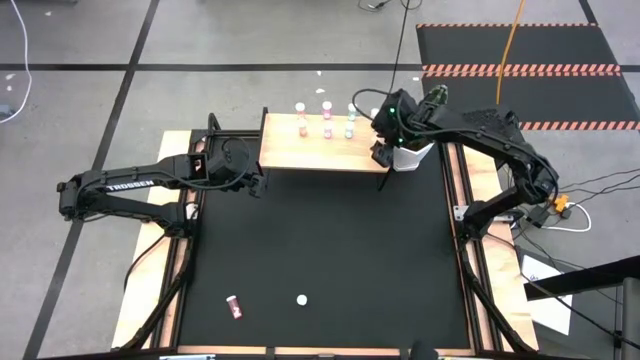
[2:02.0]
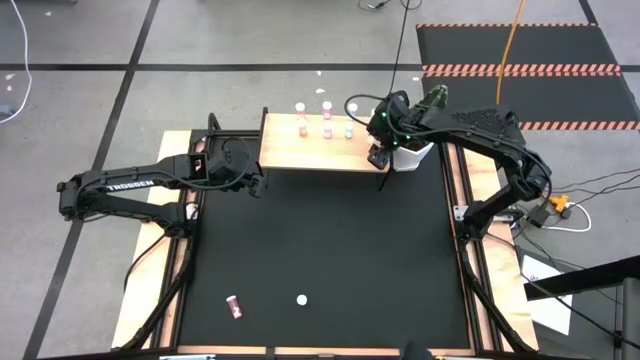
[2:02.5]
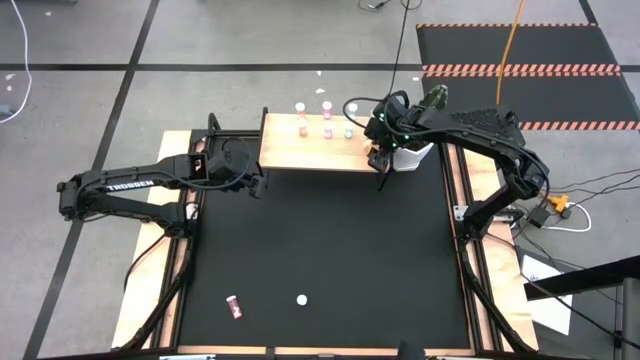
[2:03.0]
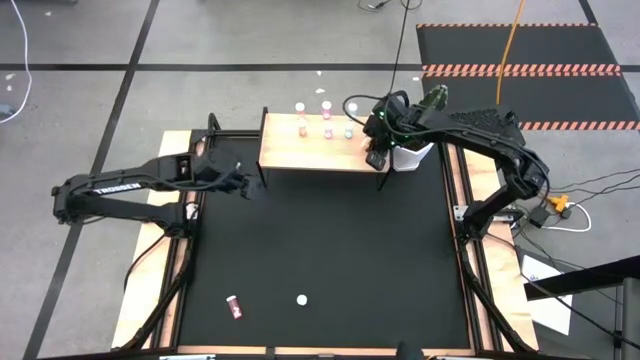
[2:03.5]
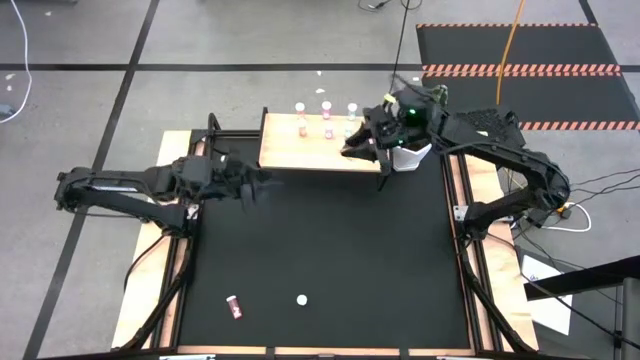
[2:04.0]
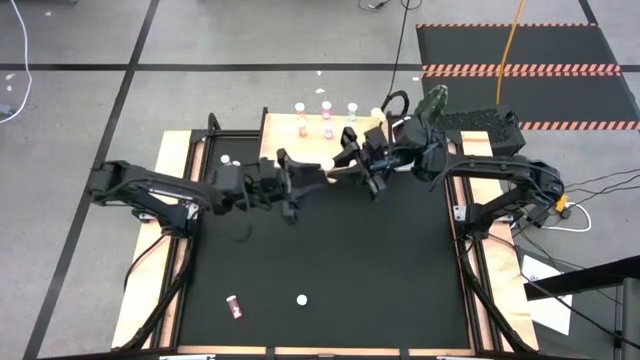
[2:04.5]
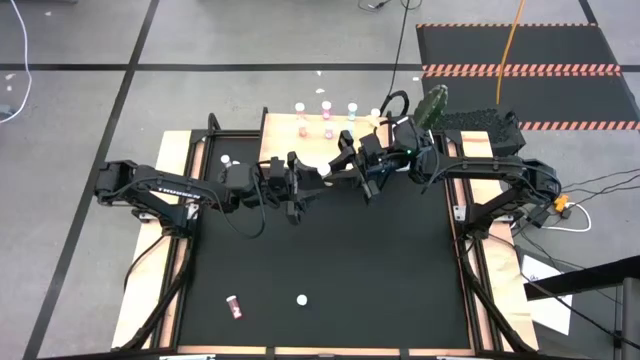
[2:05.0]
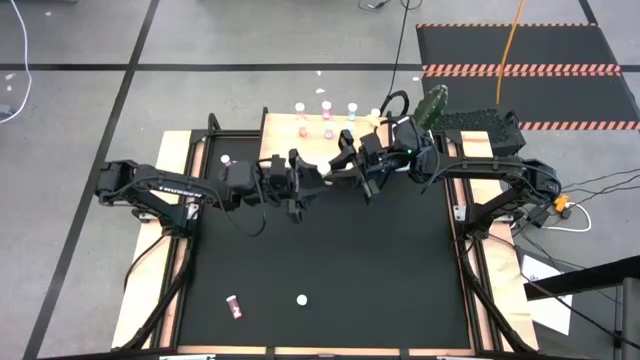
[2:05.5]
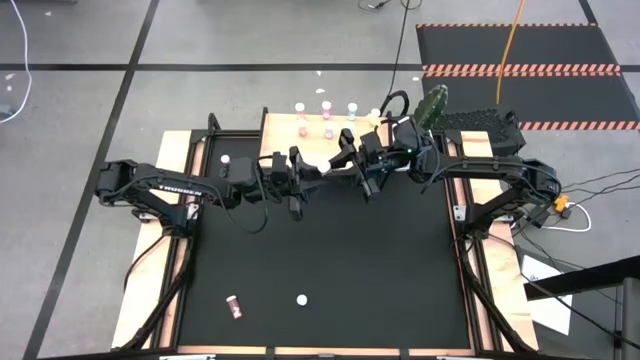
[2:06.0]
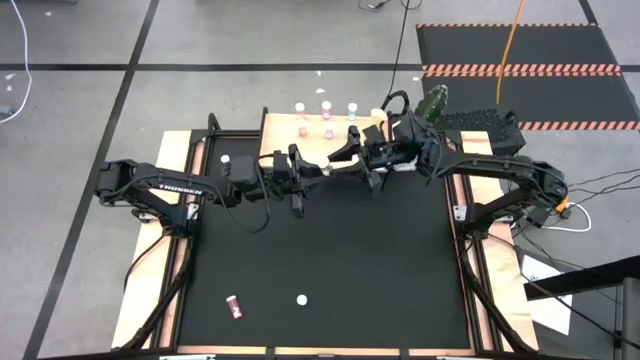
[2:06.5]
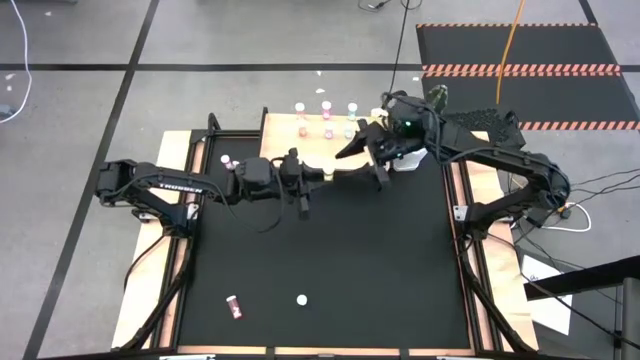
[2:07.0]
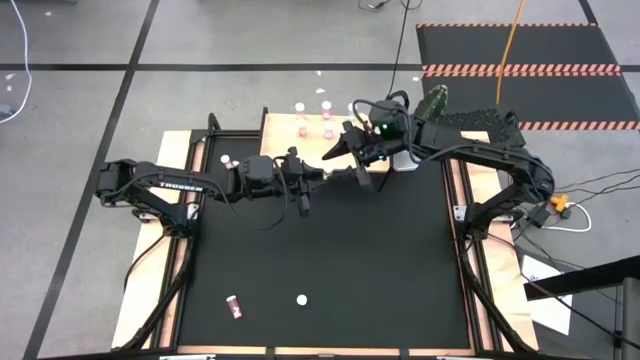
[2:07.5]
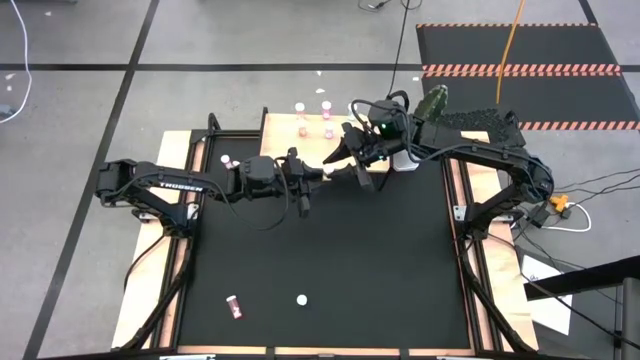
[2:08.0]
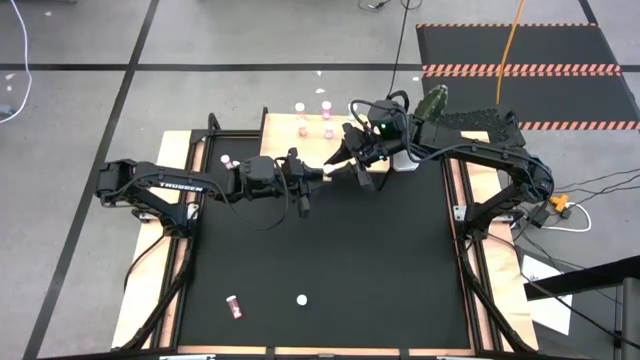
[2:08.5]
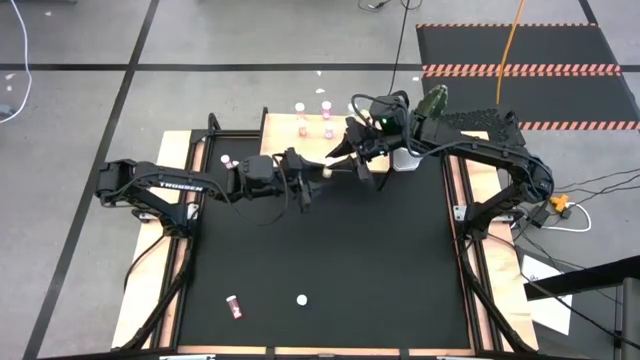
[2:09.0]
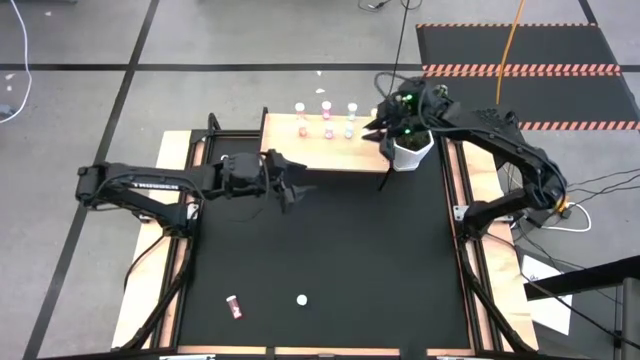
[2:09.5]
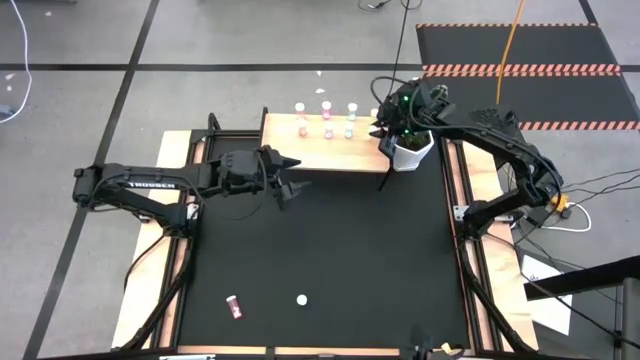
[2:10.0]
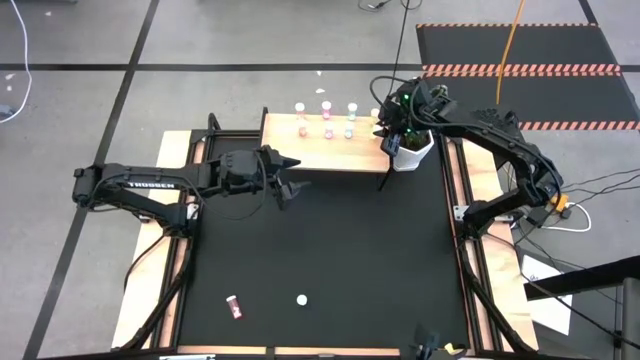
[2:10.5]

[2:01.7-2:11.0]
Task: Pick and place medicine bottles onto shelf by color
Adjust the yellow pill bottles on the shelf

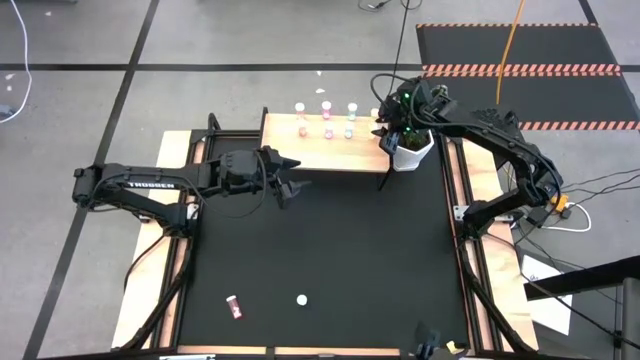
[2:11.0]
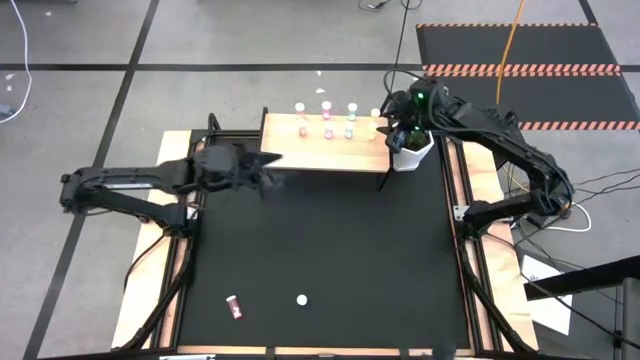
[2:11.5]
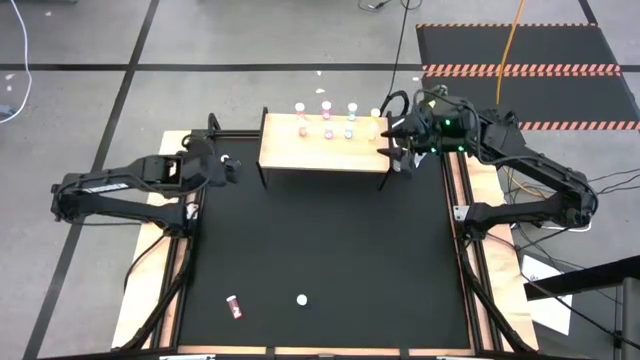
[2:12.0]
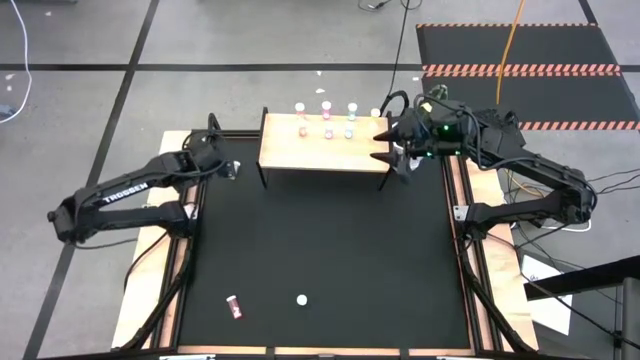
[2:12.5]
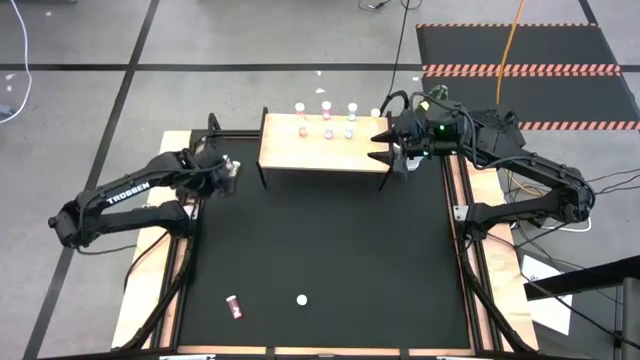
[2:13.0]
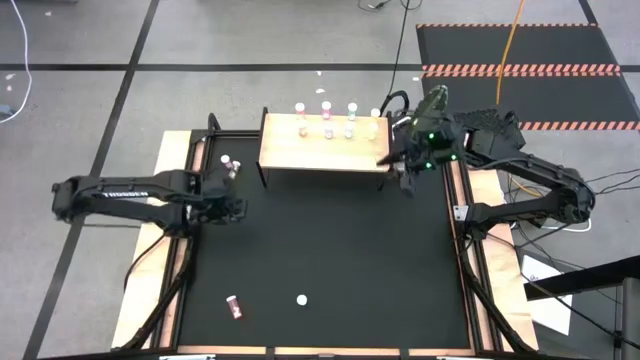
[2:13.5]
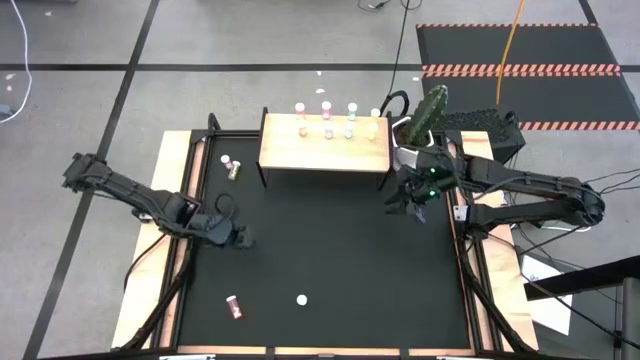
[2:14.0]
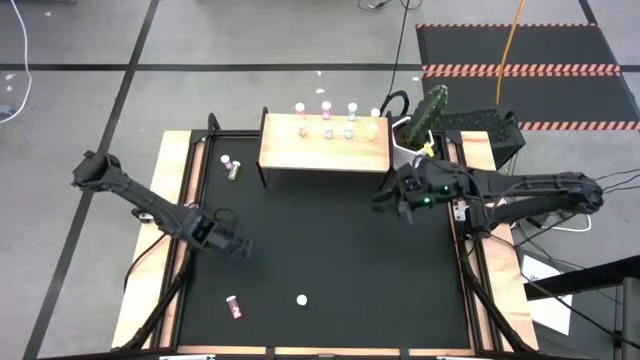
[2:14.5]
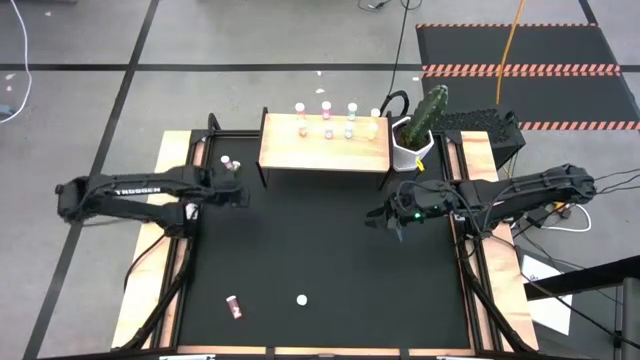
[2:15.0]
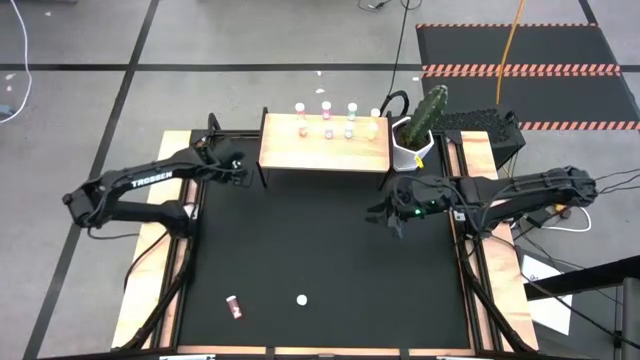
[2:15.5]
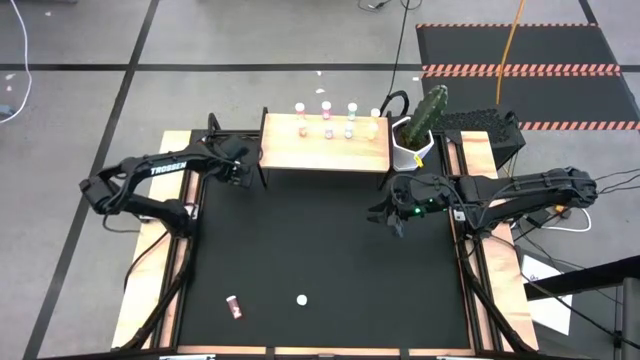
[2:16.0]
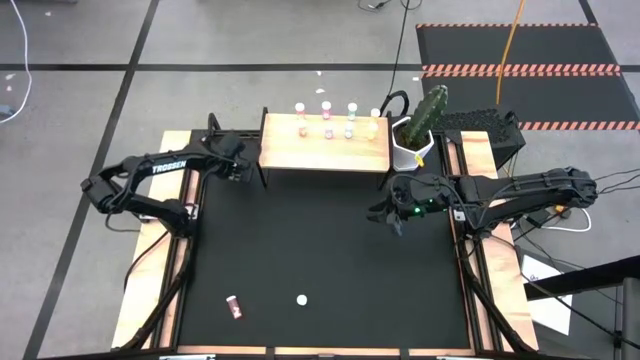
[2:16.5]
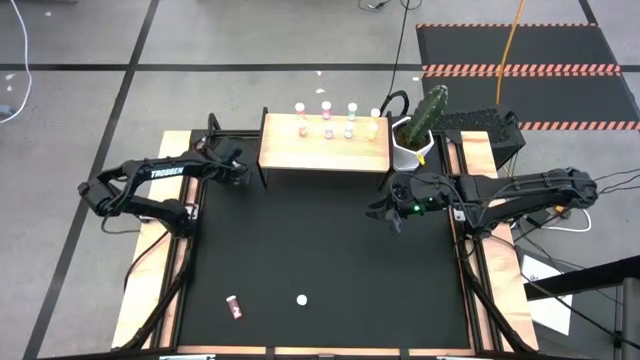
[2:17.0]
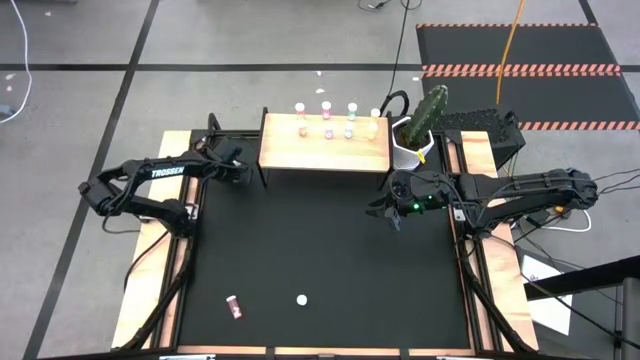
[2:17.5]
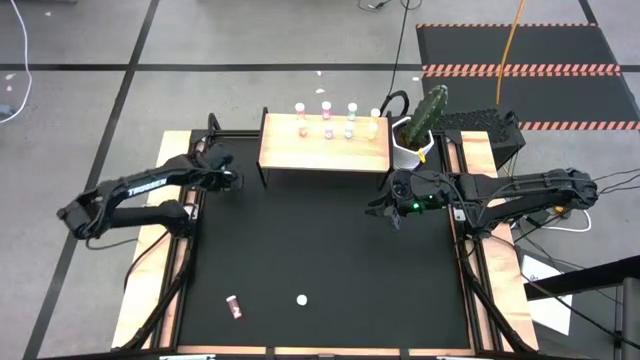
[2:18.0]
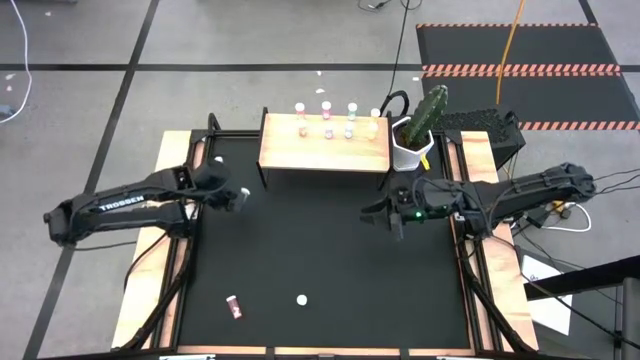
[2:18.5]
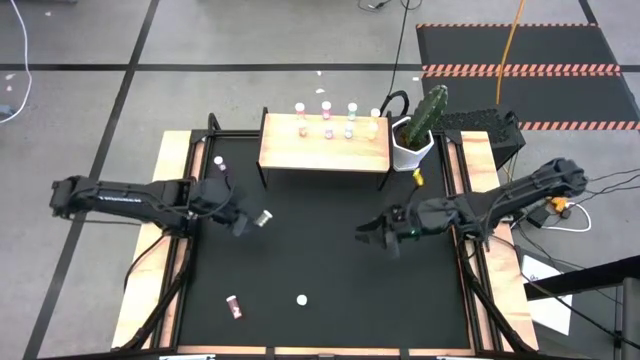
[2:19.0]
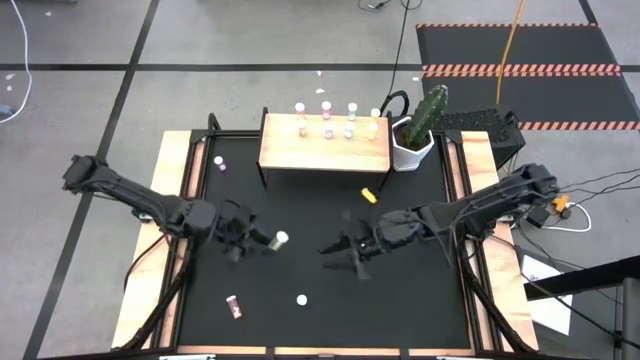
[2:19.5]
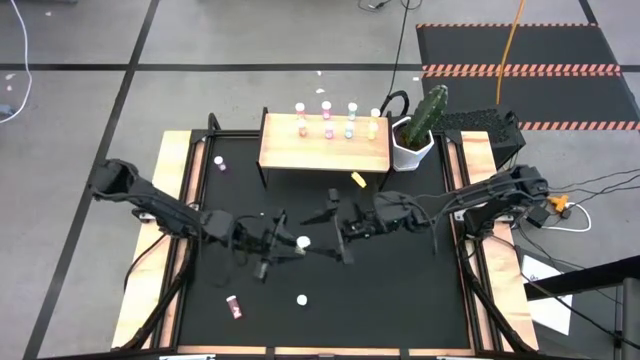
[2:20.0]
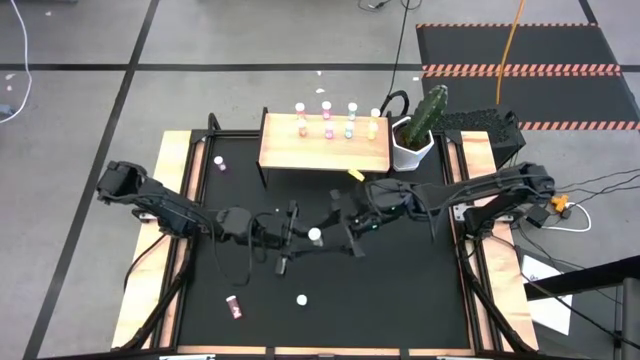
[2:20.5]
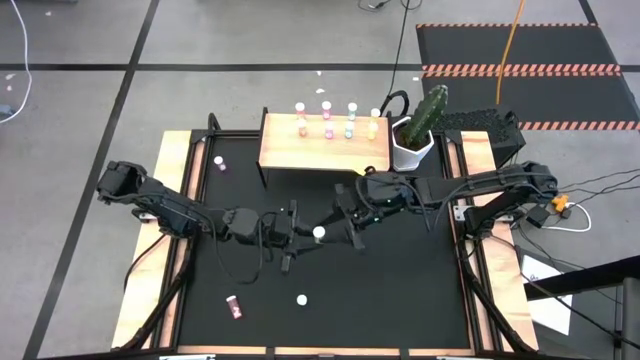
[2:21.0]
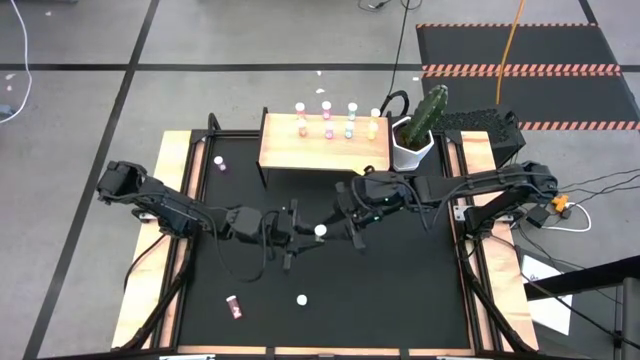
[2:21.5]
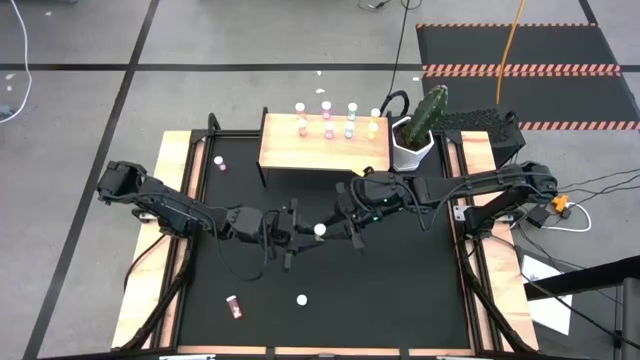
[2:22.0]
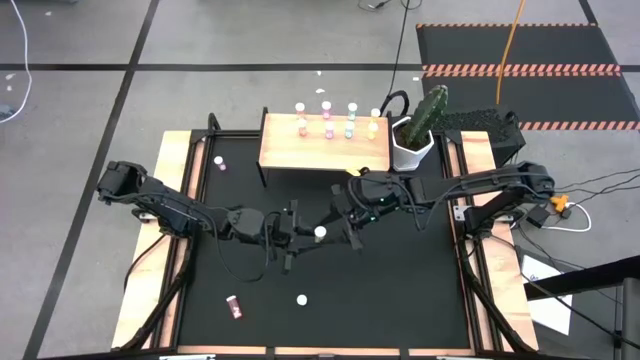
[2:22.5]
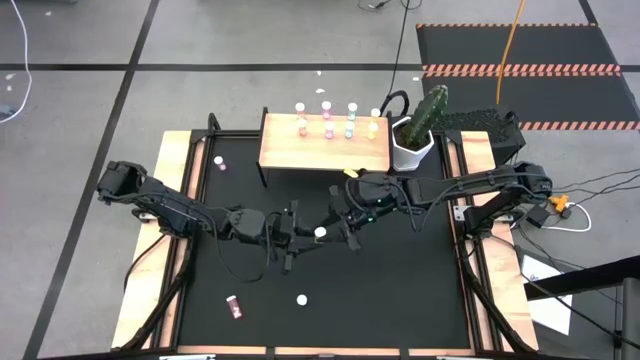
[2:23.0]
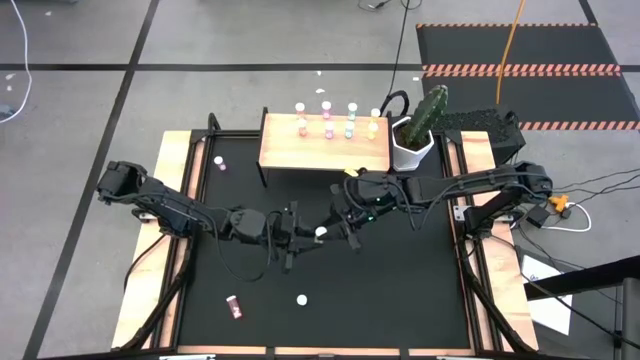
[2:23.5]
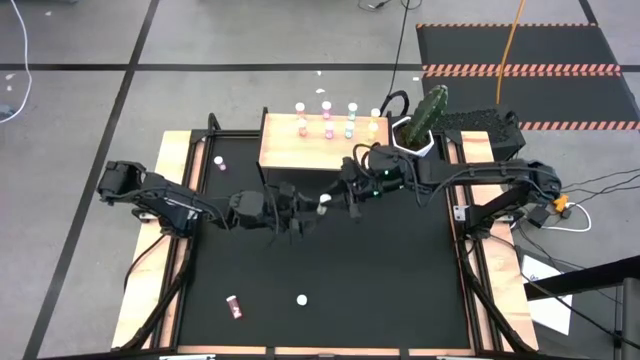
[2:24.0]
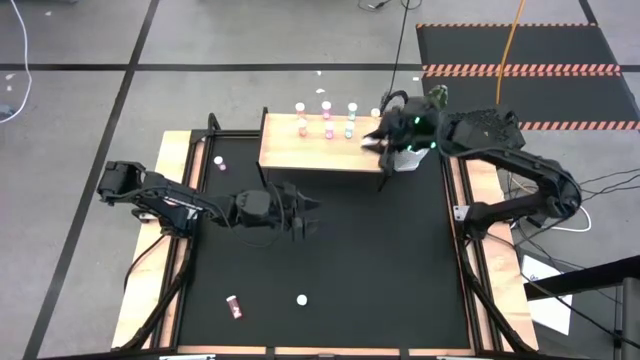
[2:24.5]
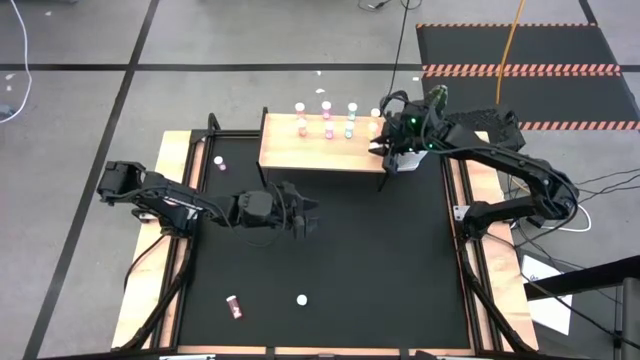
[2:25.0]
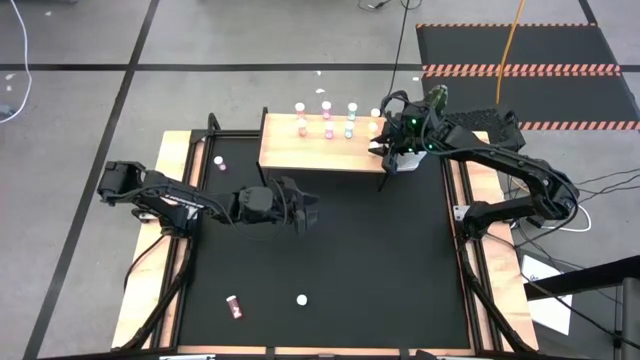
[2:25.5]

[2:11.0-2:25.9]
Put the yellow pill bottle on the shelf aligned with the other yellow pill bottles
